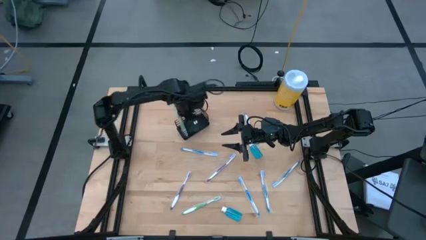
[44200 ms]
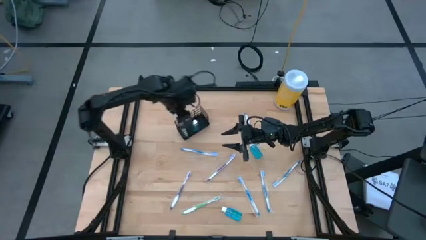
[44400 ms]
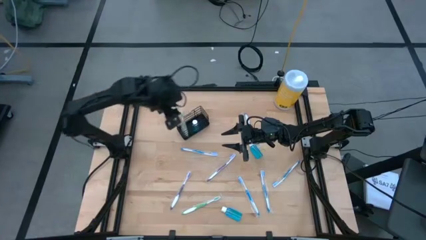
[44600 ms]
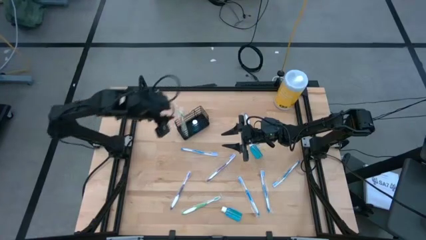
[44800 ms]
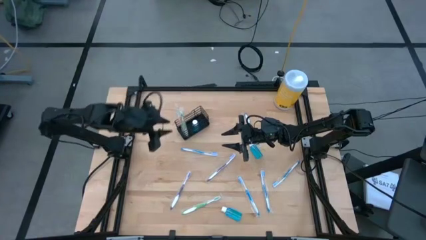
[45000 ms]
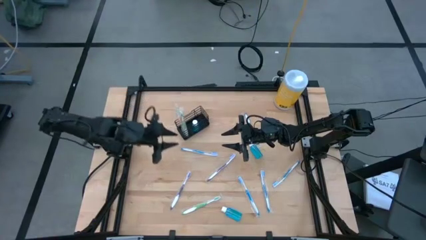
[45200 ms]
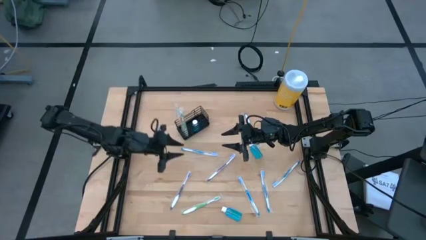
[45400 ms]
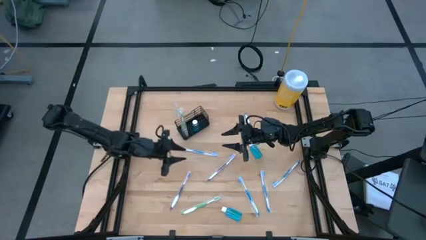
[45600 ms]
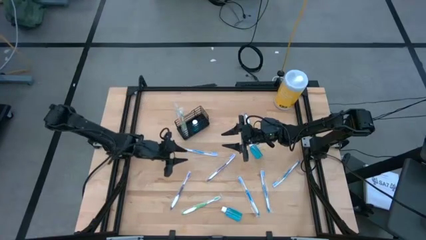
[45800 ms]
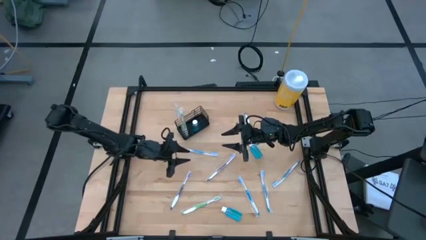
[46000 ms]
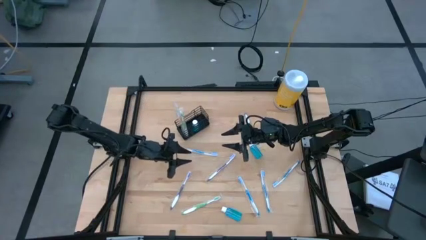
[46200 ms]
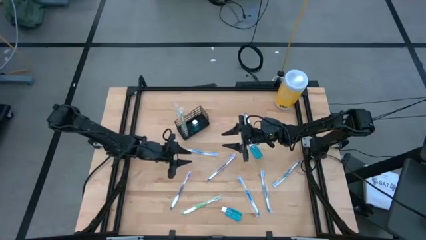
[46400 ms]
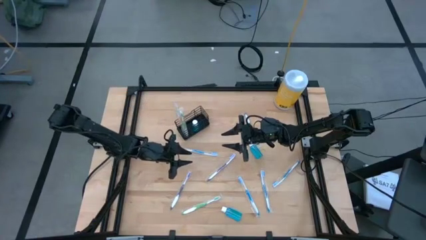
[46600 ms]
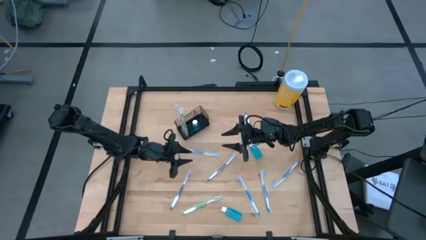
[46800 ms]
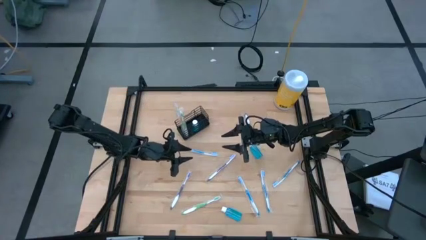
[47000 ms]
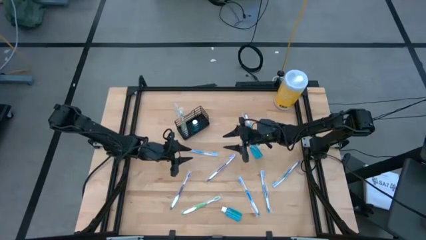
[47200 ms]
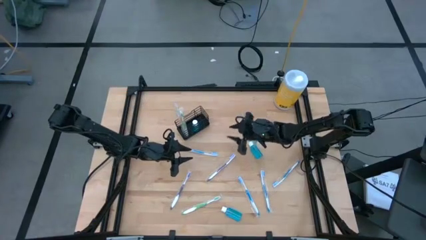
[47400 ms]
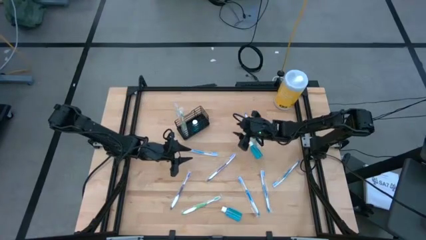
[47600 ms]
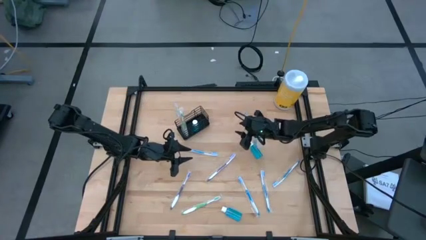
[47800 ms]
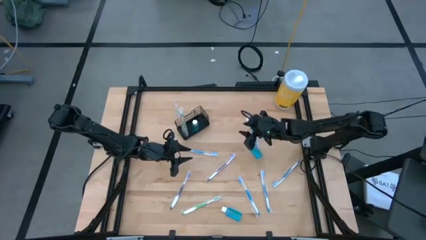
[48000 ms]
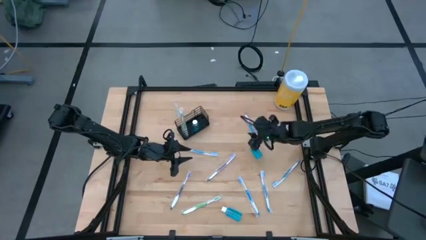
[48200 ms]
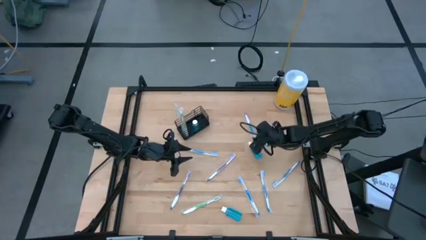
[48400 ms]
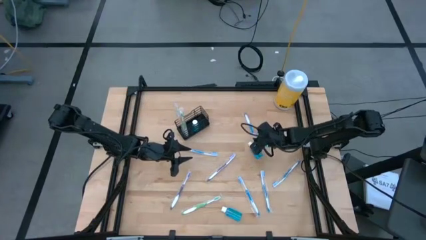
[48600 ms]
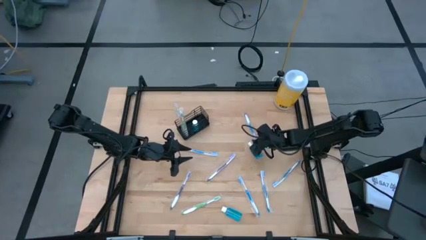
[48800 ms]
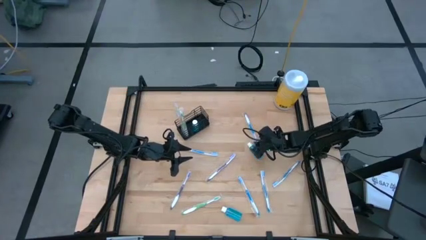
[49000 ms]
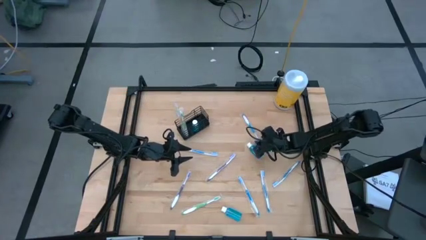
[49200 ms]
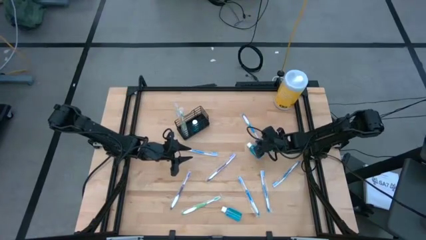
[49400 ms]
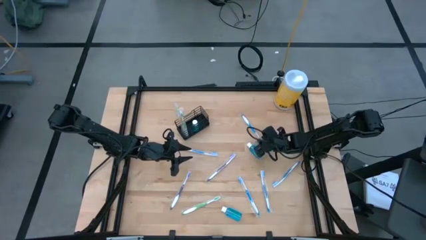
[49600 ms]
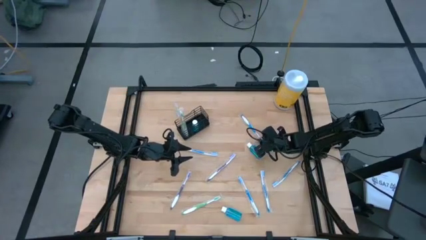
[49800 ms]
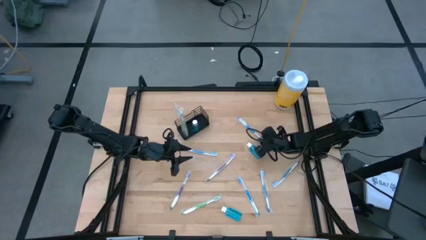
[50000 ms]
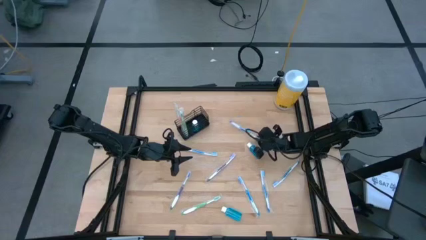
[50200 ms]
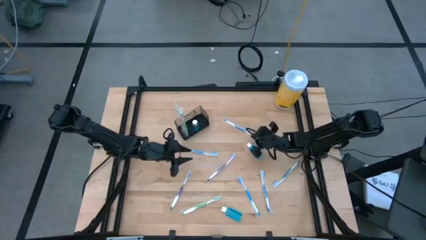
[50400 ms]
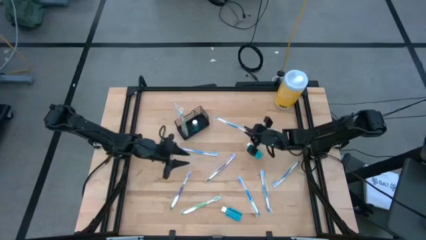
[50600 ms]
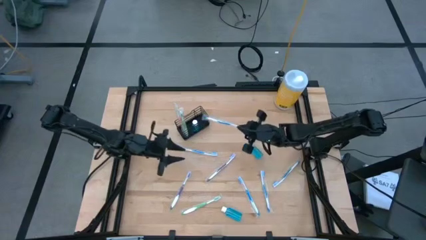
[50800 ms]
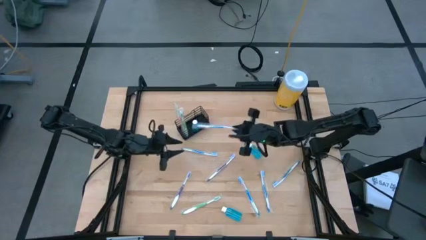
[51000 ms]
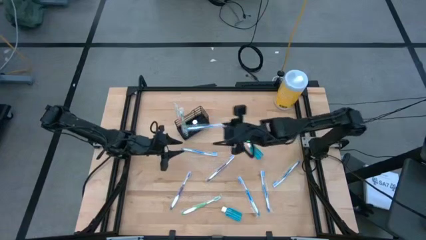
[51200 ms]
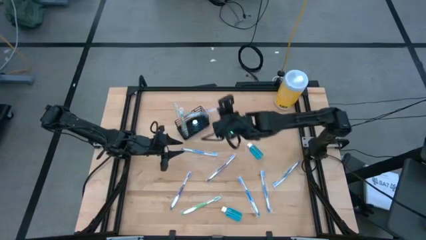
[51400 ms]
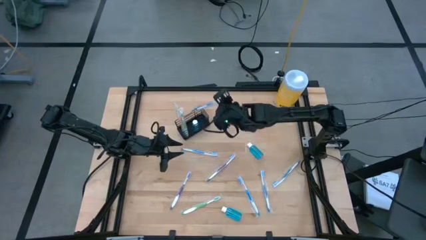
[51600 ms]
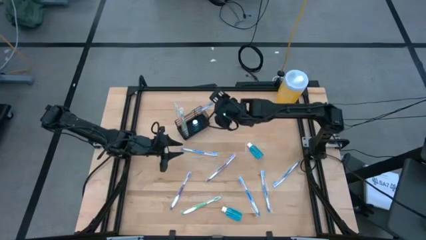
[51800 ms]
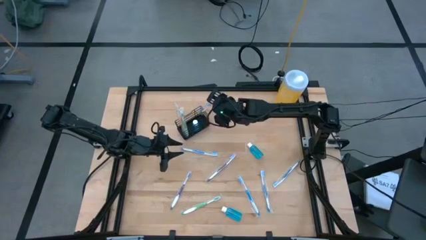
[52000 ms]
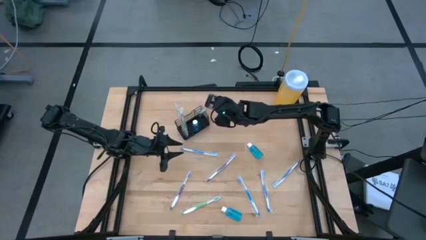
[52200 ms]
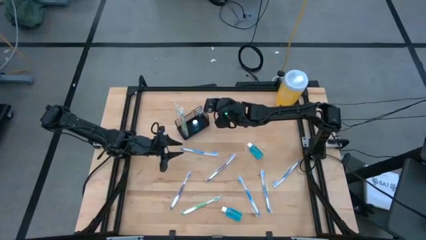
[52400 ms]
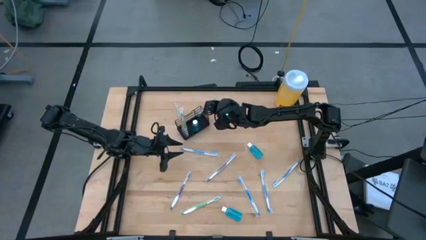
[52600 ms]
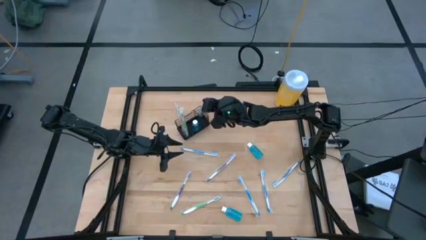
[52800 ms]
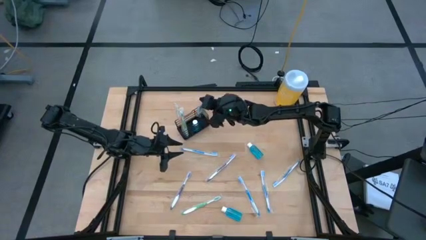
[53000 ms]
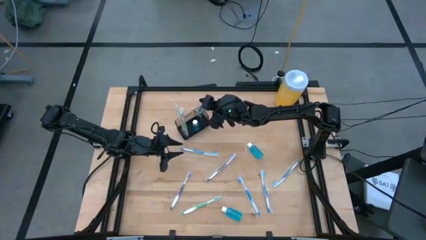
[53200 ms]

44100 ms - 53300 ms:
Task: Pick & Place toothbrushing station
Put the blue toothbrush into the black wire organizer

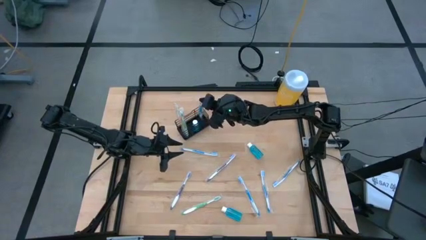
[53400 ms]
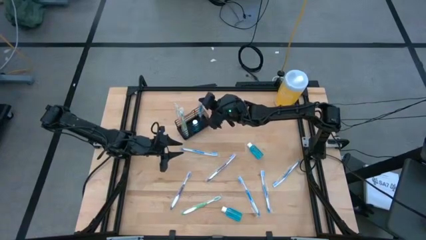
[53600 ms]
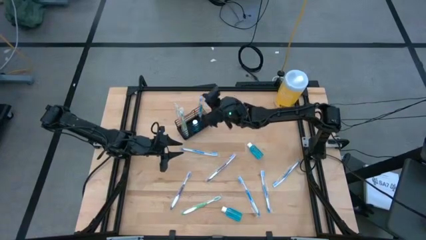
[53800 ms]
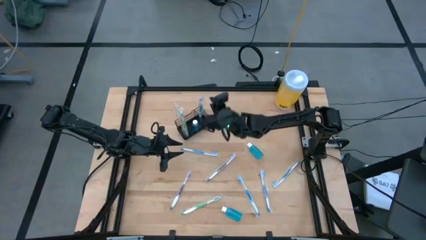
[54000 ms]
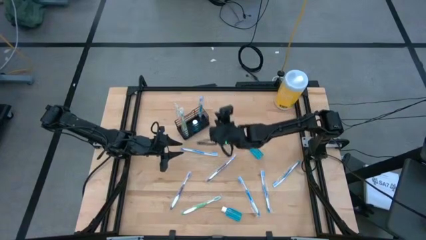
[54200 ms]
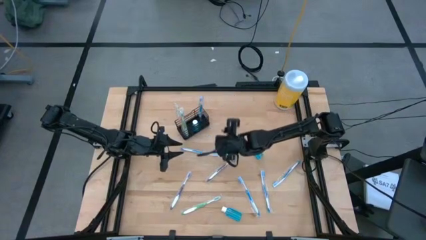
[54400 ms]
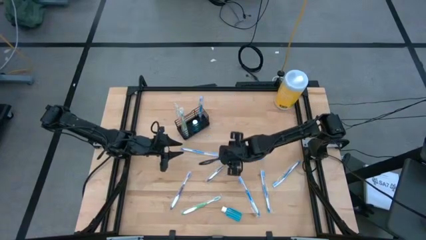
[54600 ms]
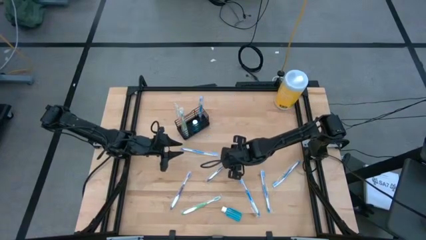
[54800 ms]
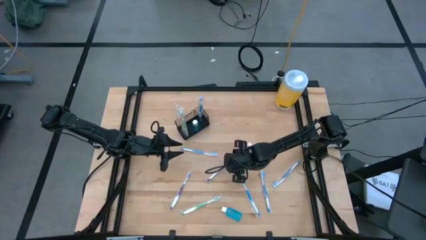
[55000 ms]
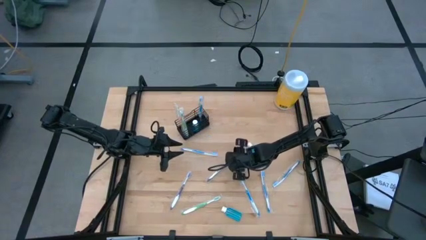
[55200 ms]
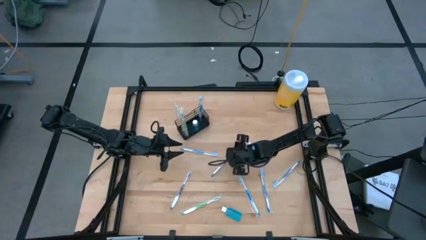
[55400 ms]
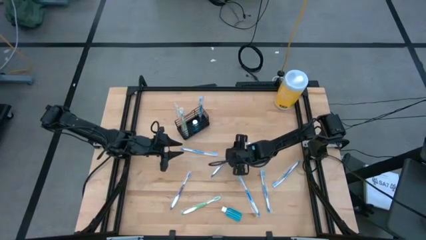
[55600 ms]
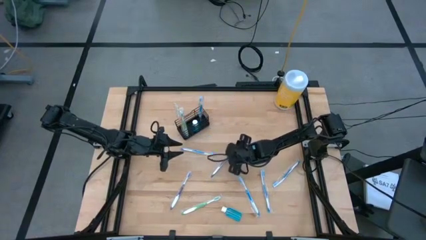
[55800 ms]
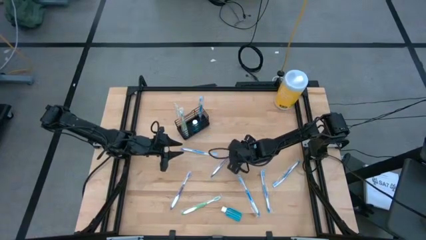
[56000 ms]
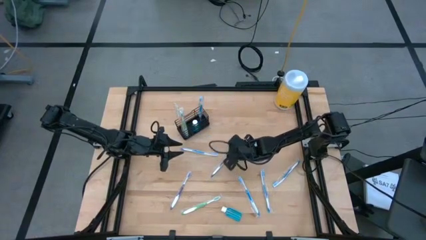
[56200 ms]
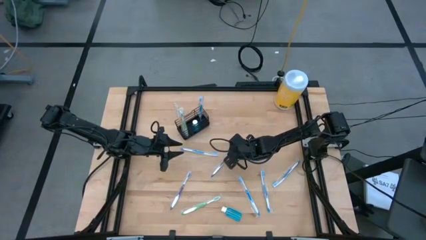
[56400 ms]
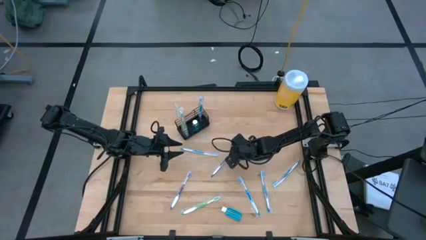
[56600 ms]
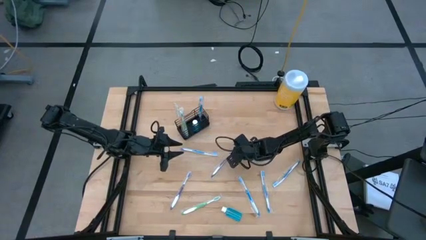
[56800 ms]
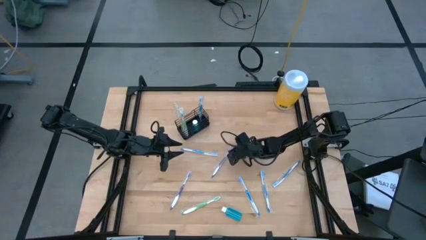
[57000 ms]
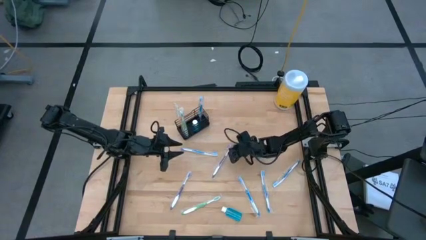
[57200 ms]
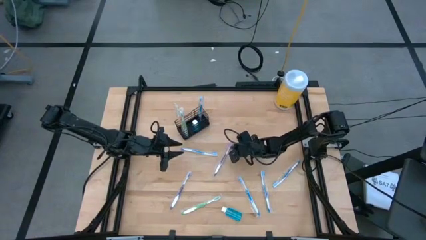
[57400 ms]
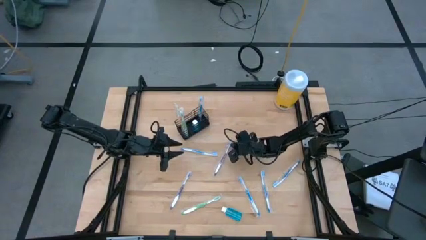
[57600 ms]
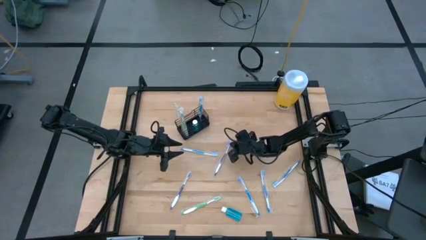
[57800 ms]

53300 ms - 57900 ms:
Put the violet toothbrush into the black wire organizer

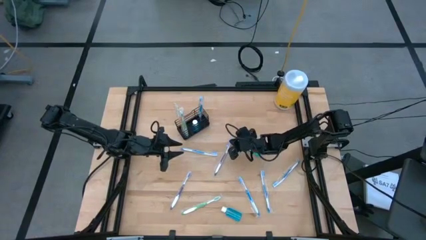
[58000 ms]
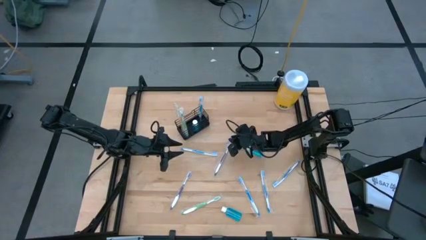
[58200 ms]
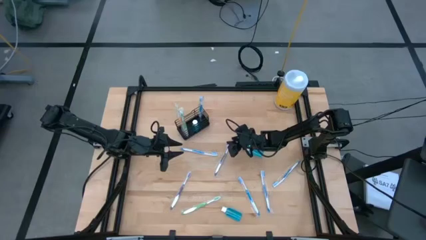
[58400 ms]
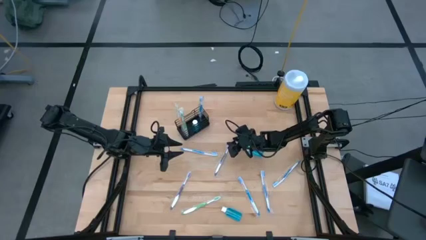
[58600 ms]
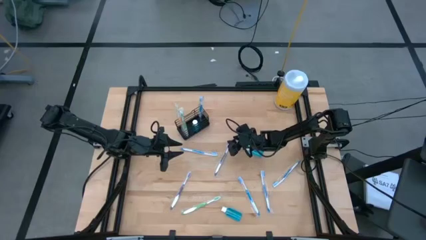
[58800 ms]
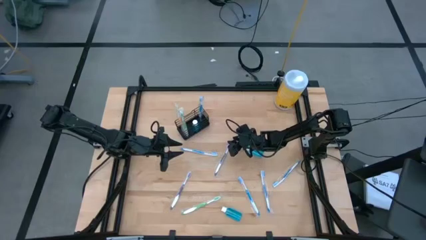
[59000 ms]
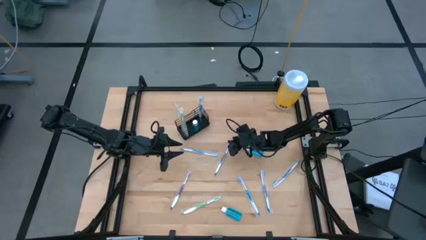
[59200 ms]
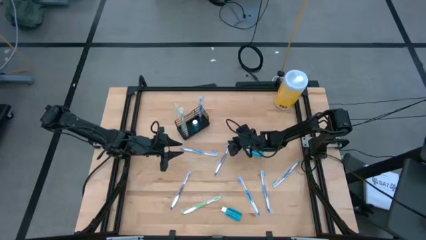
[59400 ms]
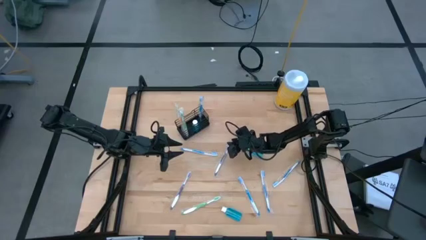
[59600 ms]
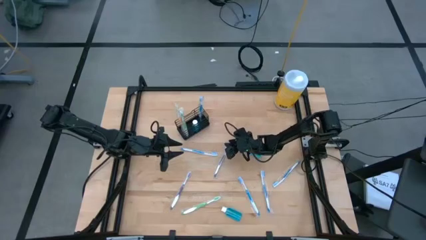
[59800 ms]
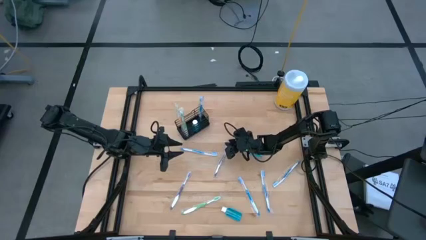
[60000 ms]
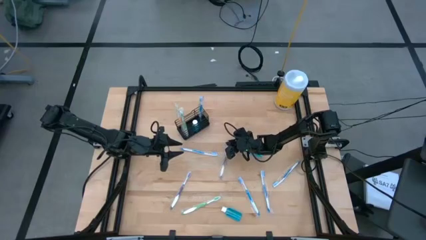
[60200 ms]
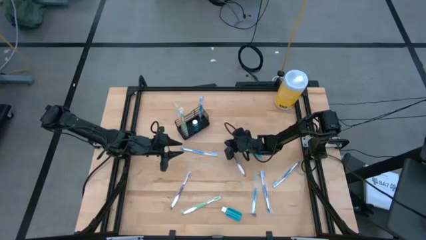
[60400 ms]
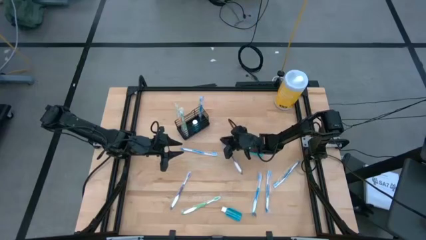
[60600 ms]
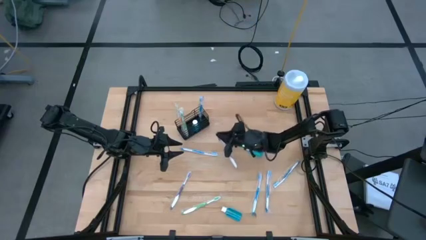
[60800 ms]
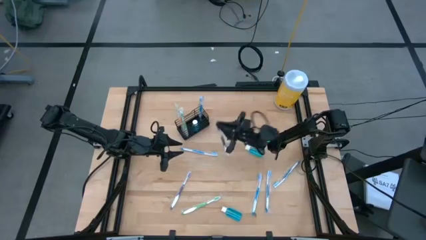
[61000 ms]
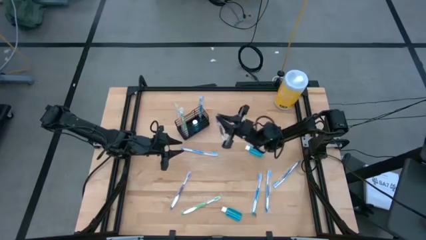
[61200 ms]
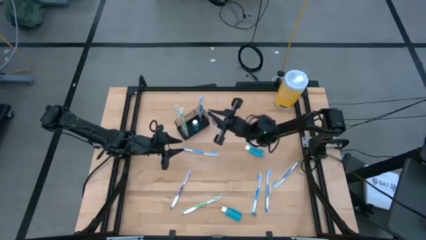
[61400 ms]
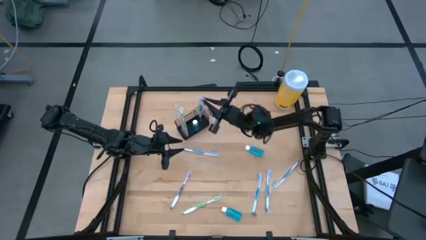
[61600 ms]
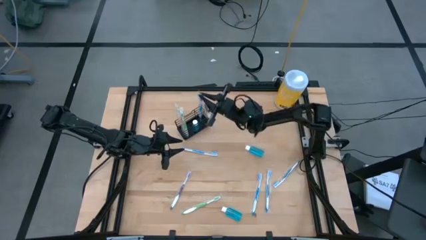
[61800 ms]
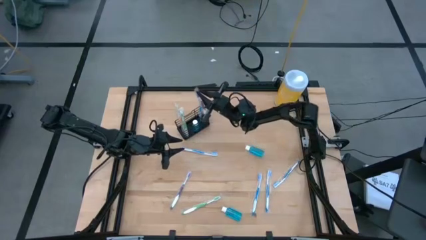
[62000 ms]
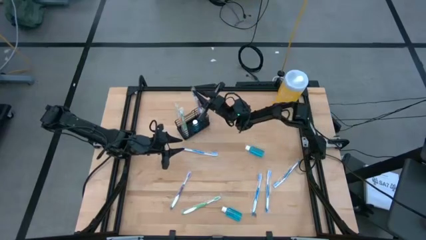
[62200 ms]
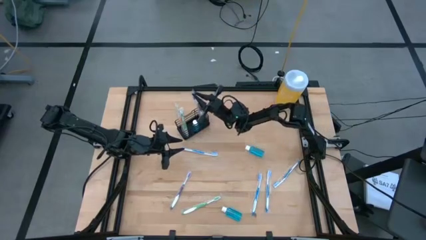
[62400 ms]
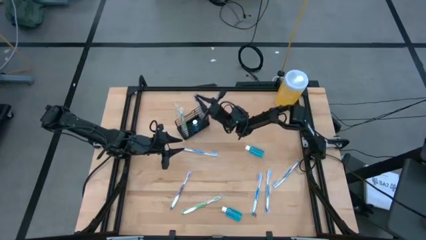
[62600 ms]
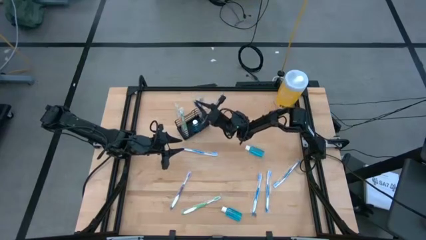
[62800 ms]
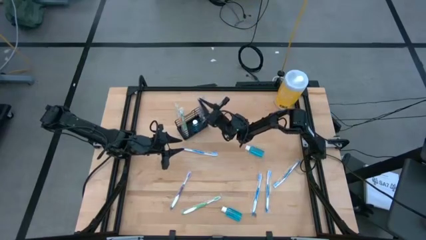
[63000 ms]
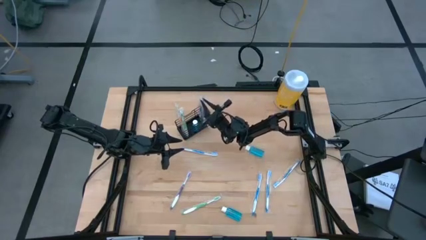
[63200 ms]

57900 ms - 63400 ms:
Put the top violet toothbrush into the black wire organizer
